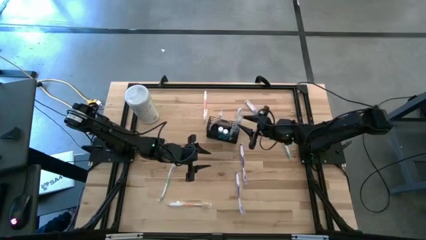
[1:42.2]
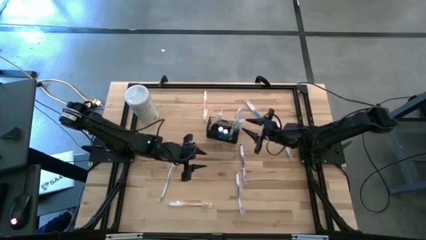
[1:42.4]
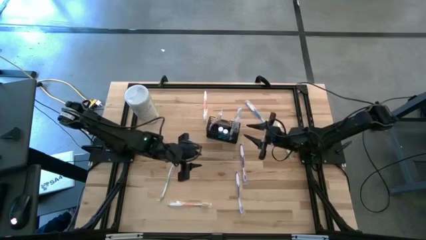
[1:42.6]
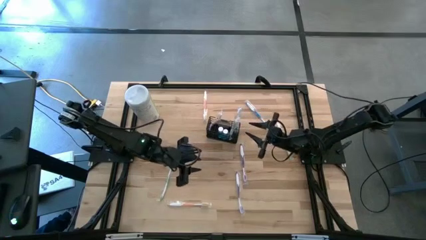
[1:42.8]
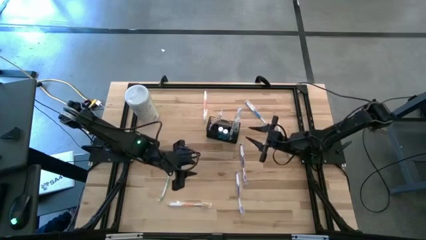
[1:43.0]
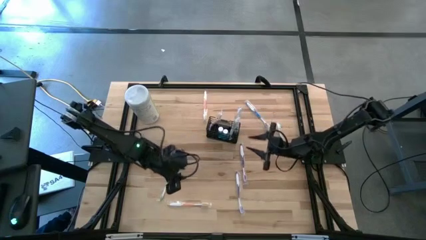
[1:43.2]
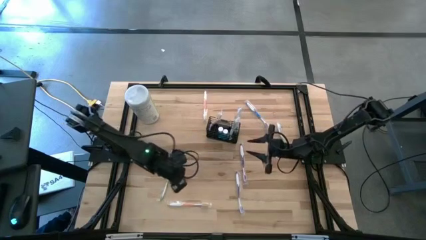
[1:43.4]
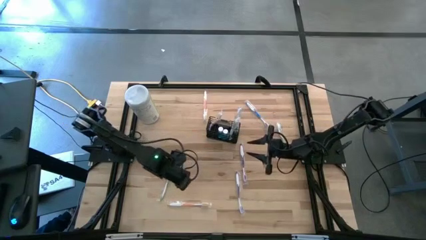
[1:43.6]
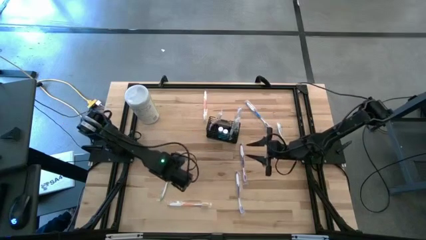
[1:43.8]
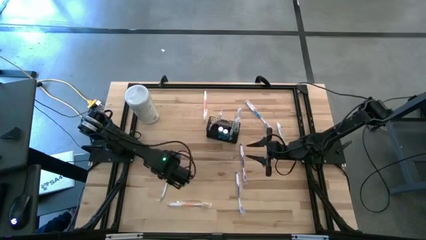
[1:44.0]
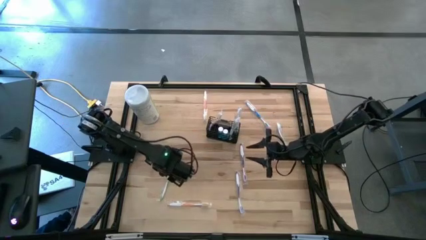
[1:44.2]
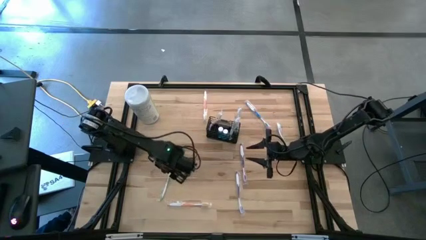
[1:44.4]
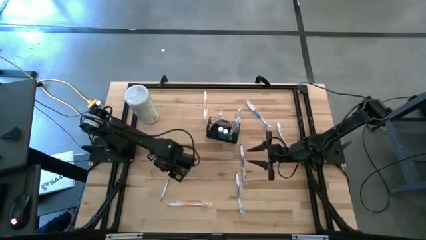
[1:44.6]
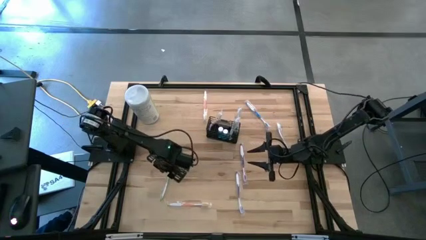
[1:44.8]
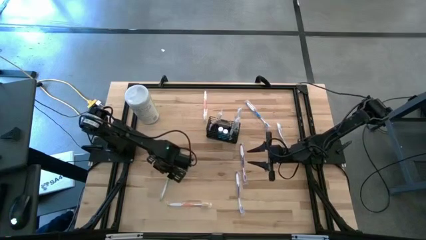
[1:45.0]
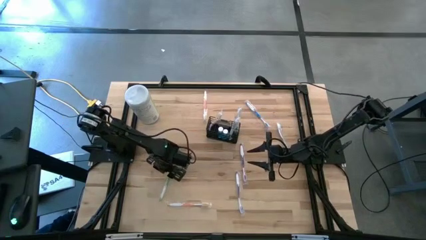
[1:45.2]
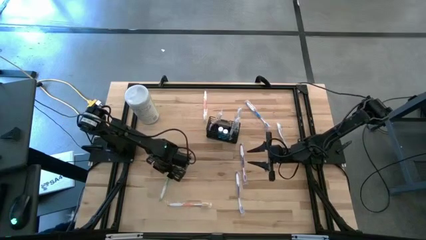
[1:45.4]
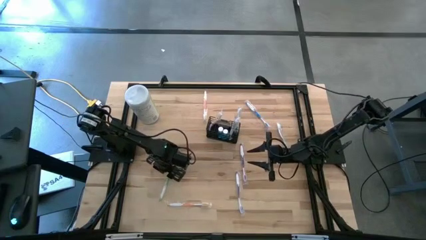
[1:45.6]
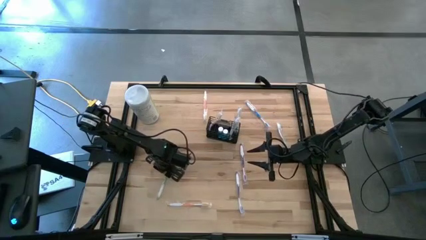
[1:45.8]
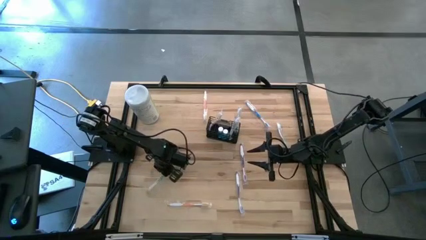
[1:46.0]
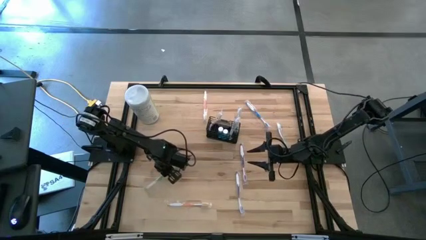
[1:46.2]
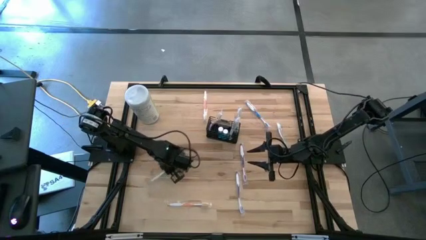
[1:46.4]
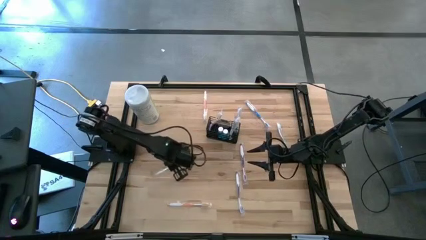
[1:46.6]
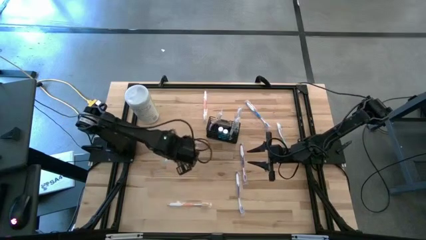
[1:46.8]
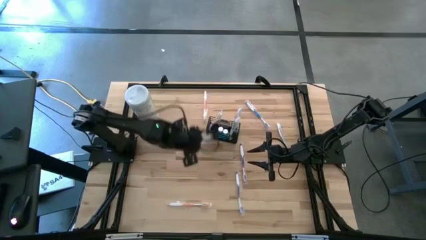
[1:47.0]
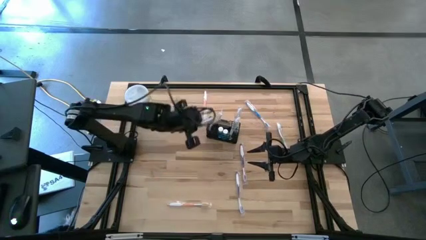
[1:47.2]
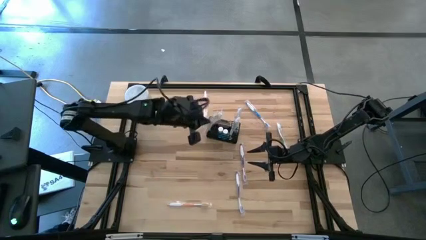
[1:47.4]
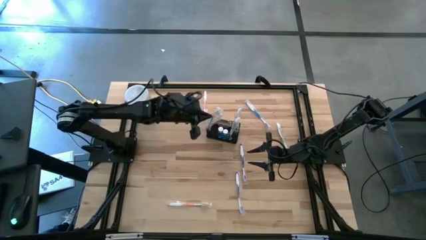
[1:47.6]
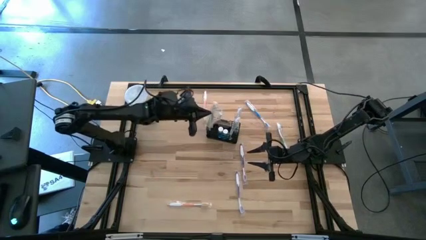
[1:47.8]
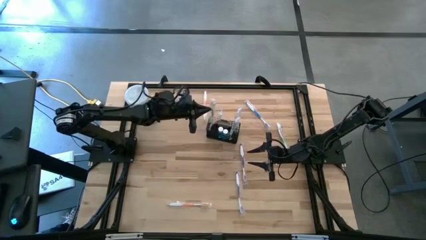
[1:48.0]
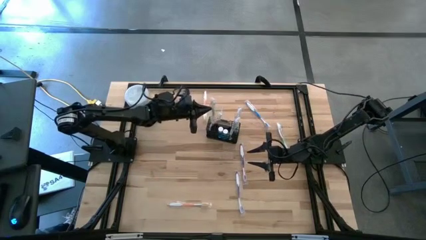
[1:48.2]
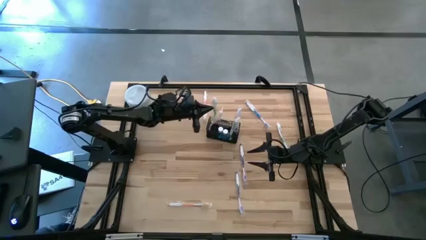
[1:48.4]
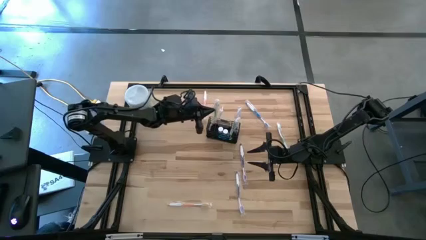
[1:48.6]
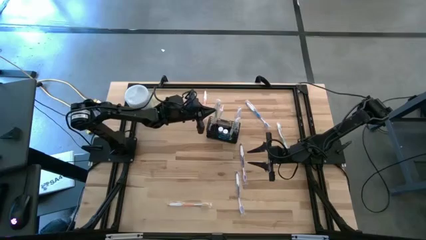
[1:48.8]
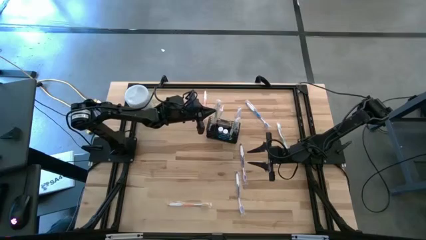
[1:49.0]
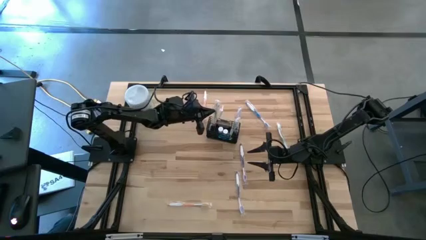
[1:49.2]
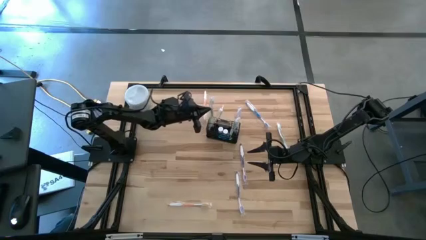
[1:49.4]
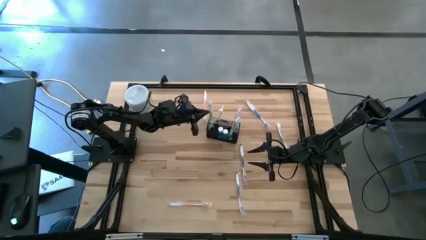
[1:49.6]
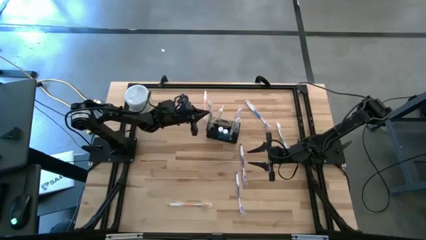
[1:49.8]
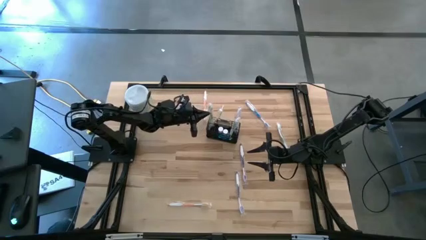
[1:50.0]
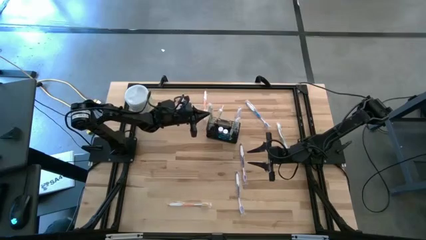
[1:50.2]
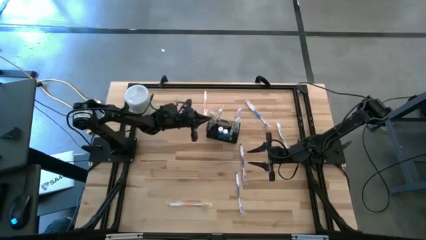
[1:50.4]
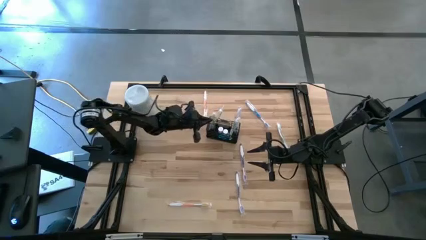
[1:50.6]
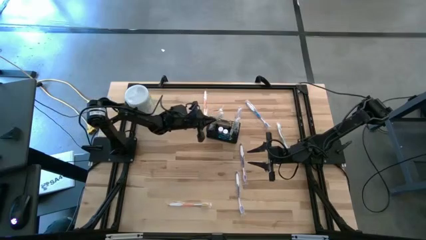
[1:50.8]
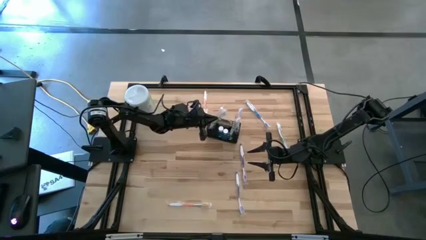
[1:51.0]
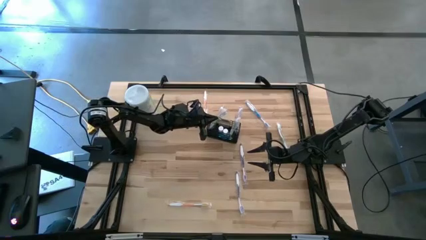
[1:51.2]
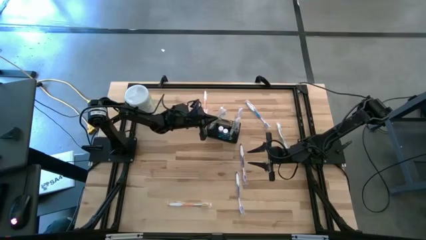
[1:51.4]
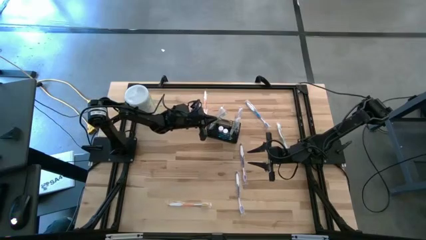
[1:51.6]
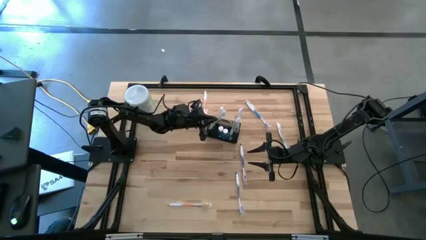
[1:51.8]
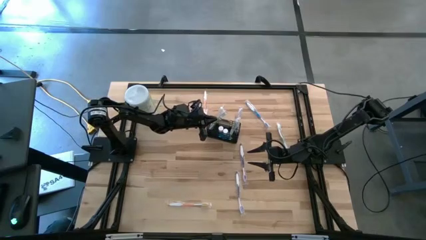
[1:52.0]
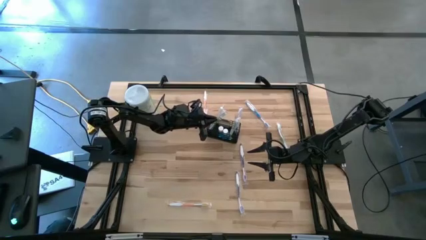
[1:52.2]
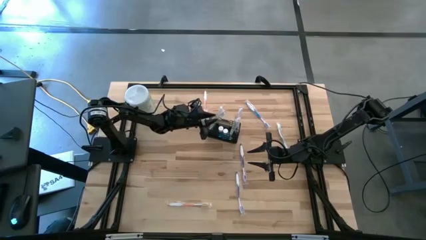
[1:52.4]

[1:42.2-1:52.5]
Task: Pick & Place toothbrushing station
Put the left green toothbrush into the mesh organizer

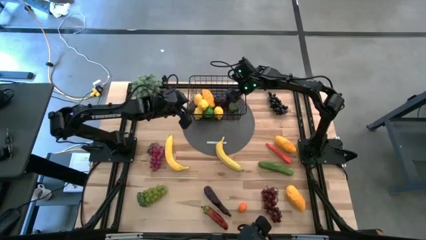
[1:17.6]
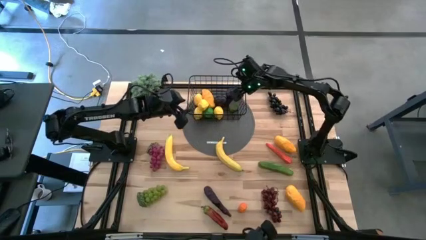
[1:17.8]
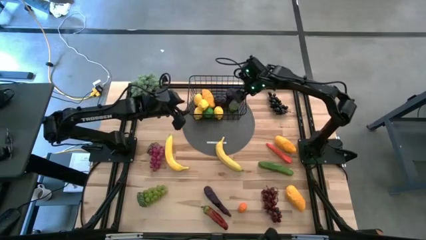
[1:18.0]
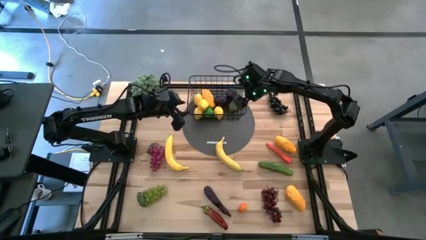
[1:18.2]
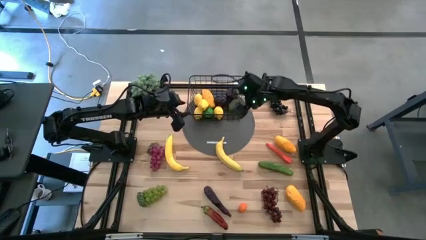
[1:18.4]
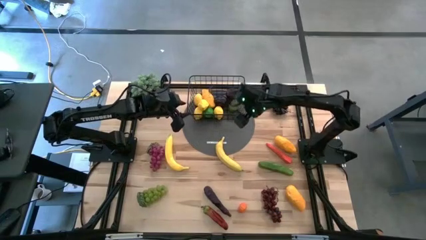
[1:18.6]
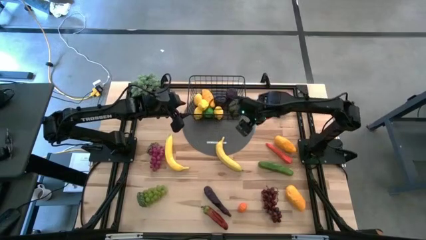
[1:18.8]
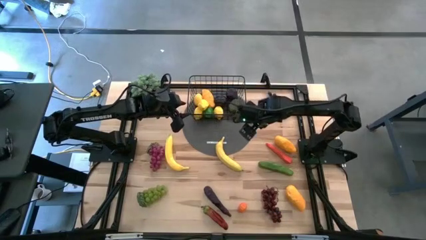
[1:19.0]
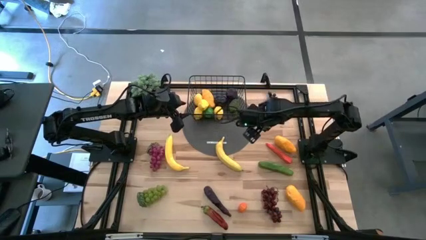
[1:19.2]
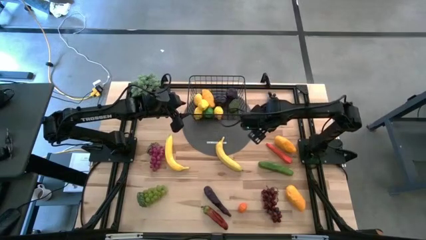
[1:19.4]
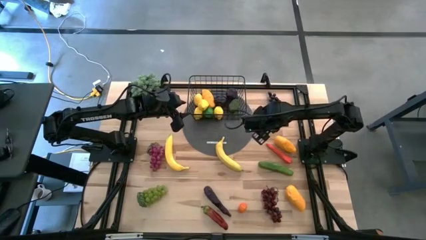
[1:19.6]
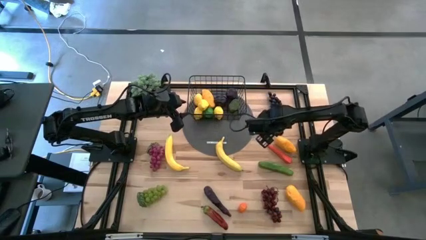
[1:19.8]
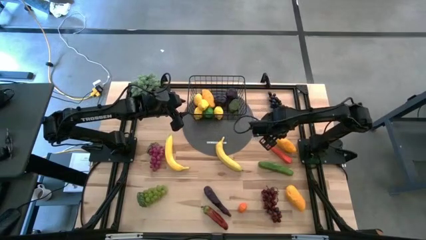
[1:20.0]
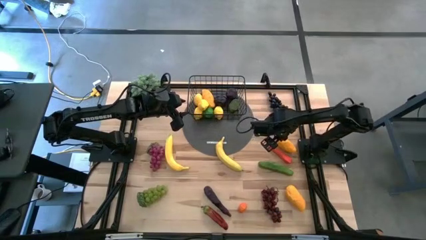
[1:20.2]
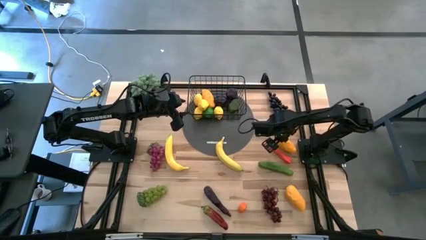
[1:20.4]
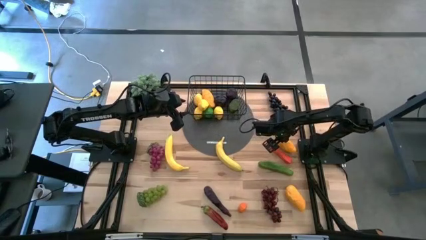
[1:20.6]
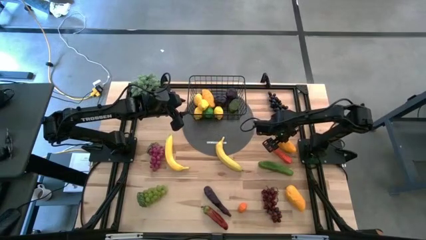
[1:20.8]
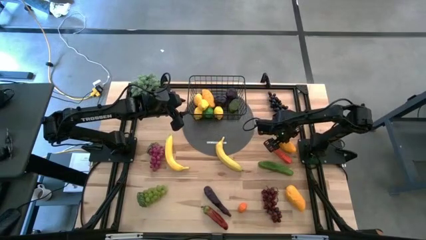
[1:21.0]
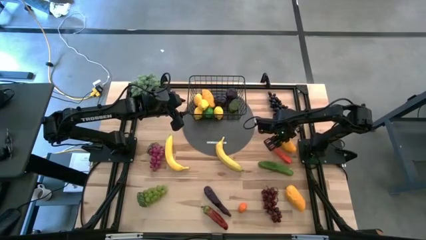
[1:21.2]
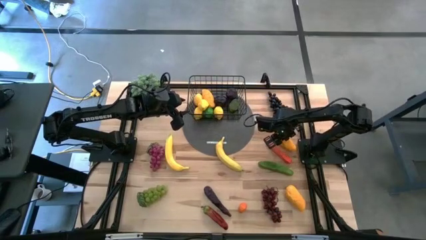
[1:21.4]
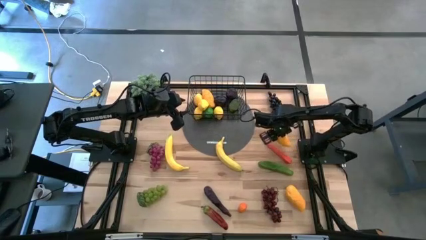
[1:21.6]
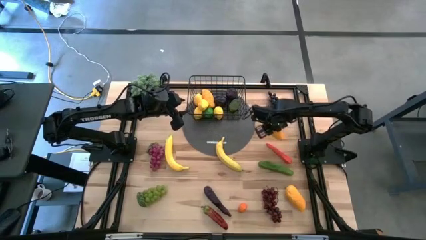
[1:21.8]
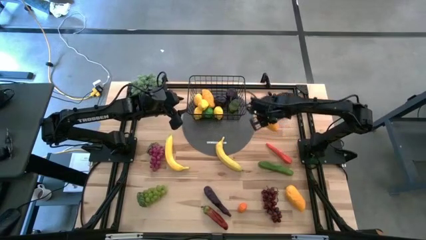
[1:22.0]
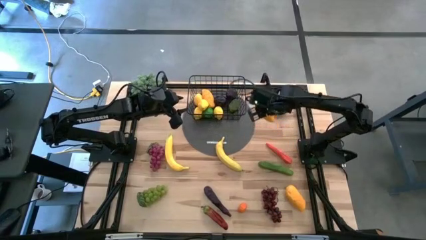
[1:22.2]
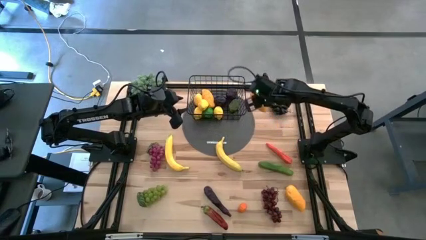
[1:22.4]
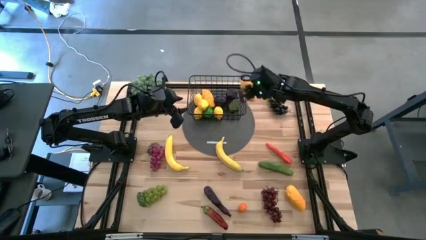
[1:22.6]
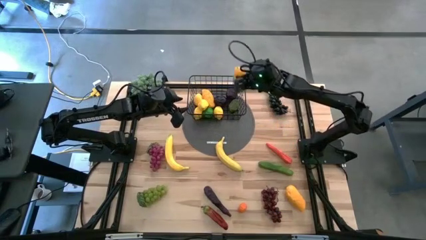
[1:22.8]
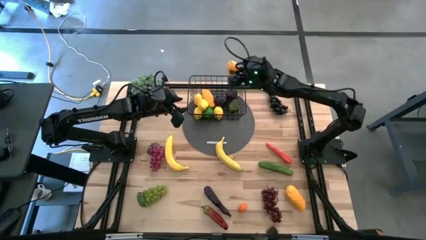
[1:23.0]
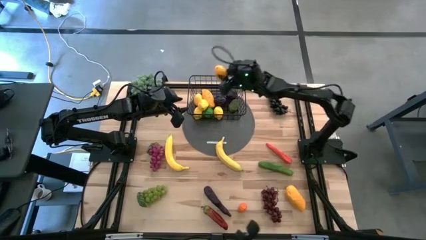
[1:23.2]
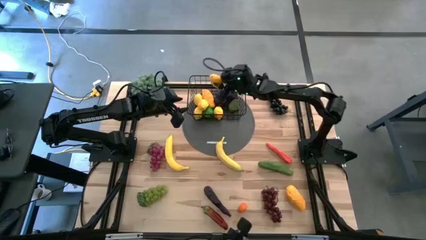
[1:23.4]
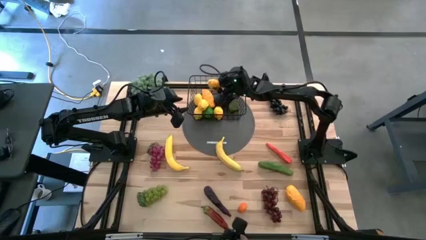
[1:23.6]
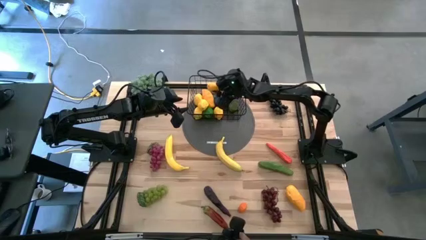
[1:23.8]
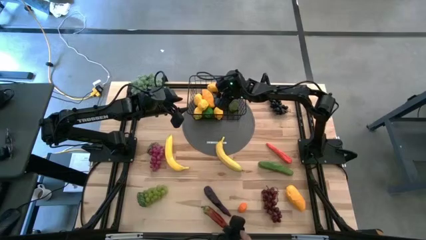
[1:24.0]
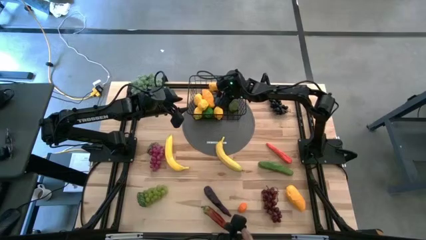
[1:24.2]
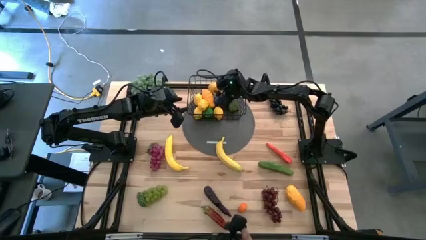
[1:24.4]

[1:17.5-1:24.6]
Task: Build produce basket
Put the yellow mango into the black wire basket
